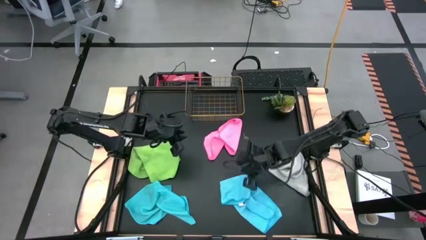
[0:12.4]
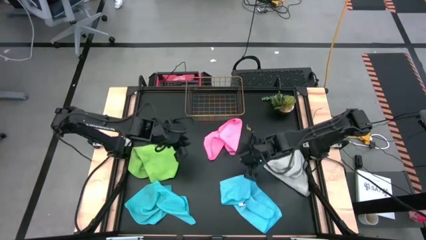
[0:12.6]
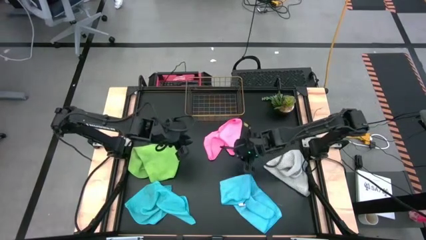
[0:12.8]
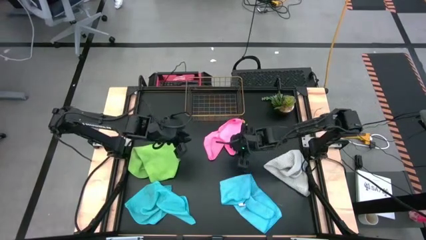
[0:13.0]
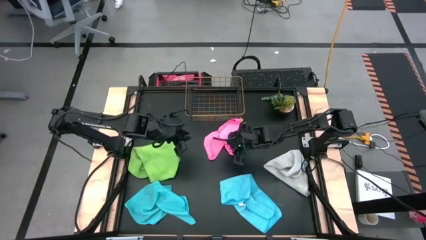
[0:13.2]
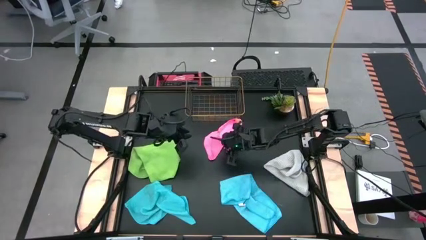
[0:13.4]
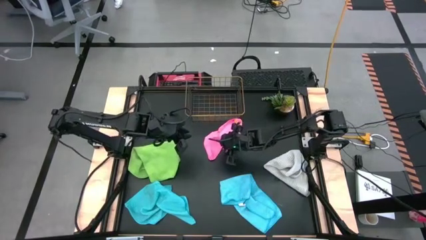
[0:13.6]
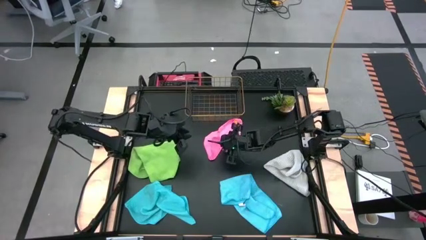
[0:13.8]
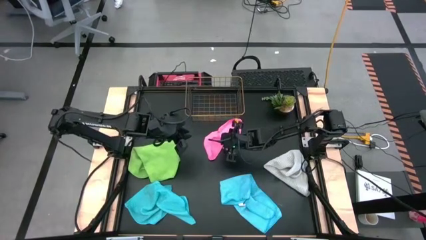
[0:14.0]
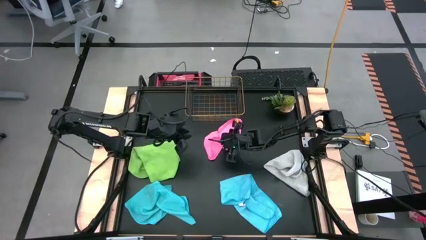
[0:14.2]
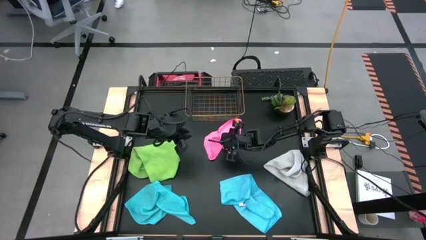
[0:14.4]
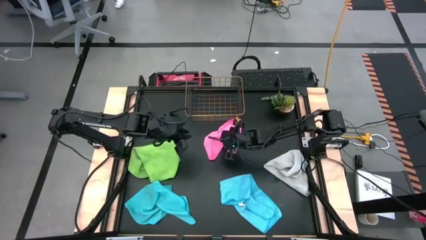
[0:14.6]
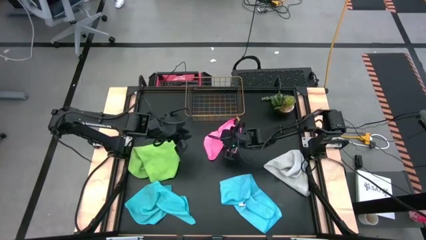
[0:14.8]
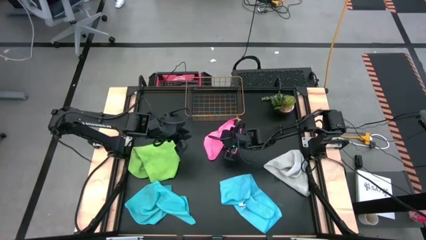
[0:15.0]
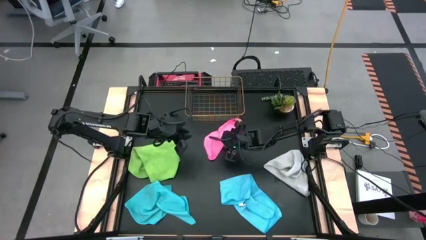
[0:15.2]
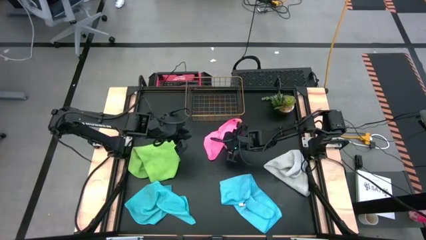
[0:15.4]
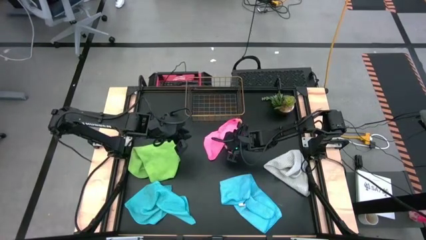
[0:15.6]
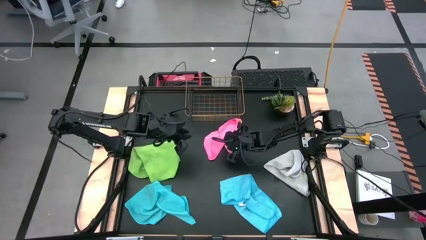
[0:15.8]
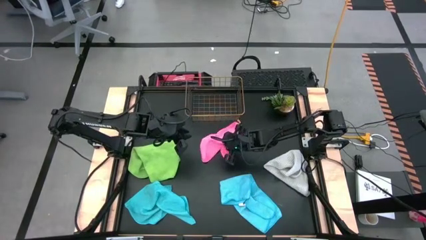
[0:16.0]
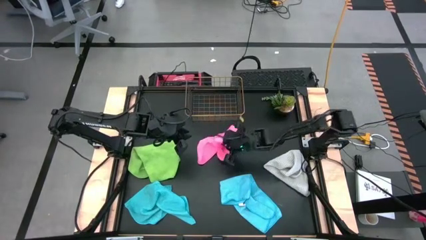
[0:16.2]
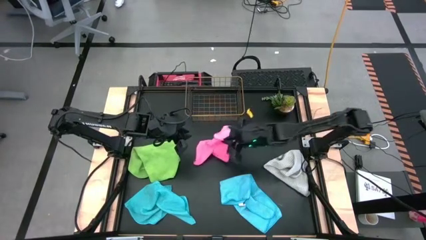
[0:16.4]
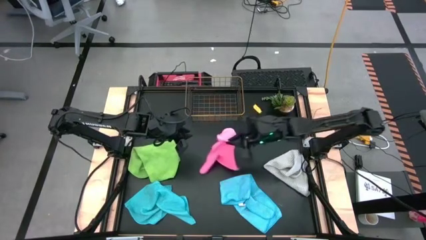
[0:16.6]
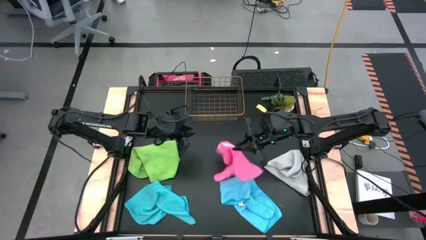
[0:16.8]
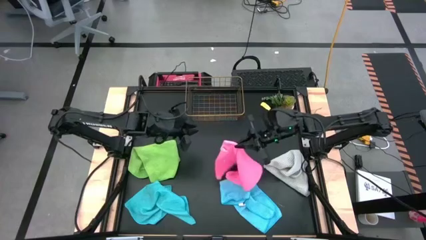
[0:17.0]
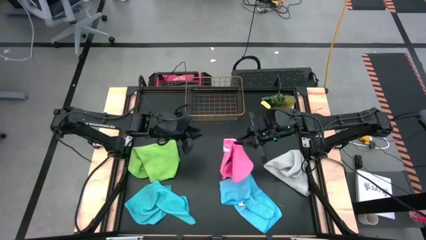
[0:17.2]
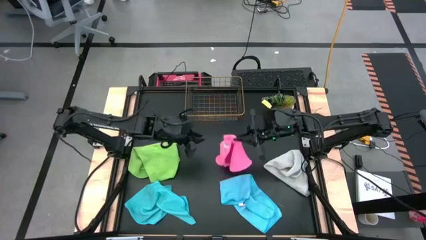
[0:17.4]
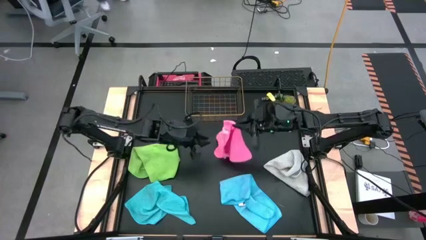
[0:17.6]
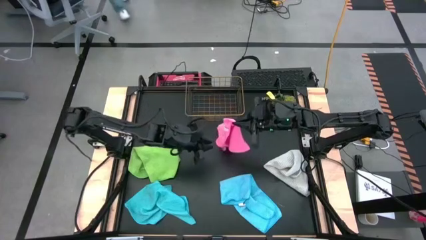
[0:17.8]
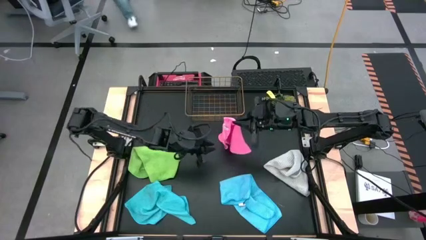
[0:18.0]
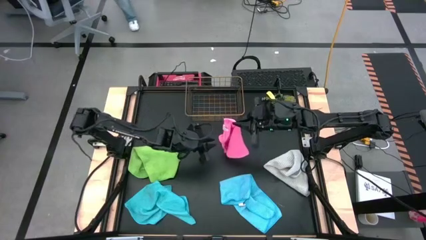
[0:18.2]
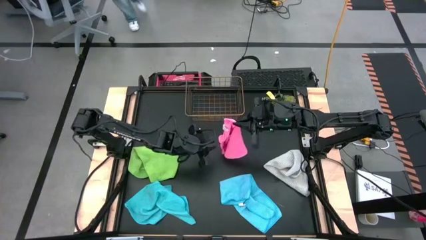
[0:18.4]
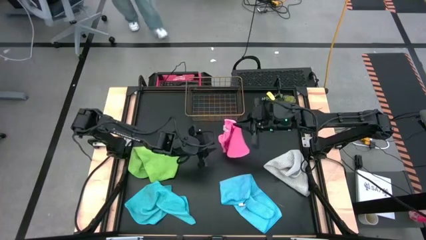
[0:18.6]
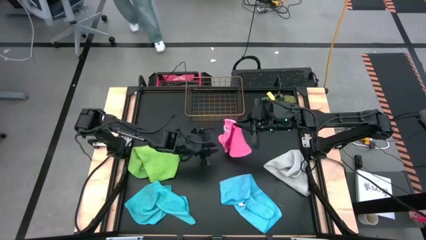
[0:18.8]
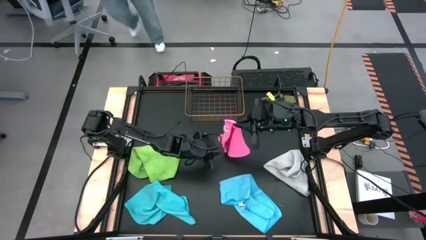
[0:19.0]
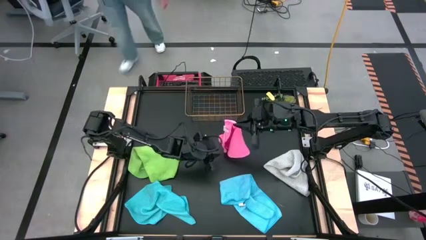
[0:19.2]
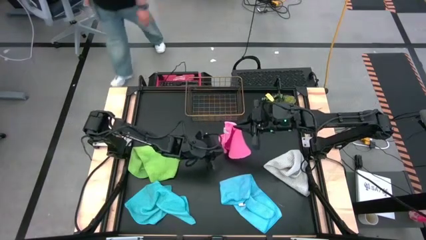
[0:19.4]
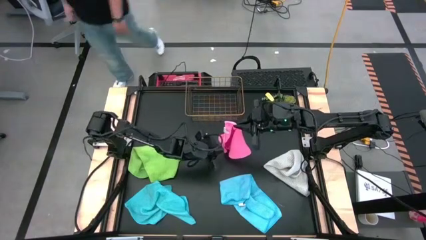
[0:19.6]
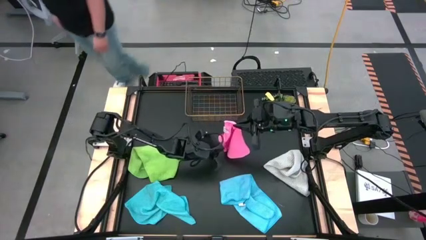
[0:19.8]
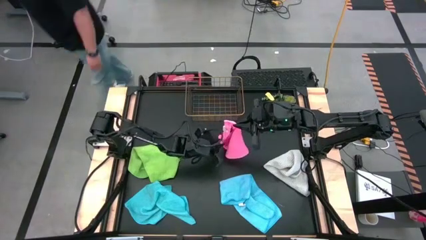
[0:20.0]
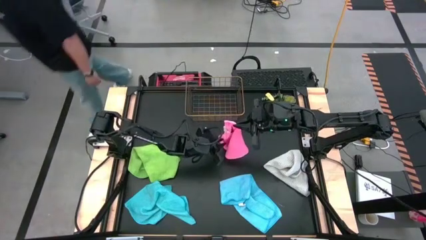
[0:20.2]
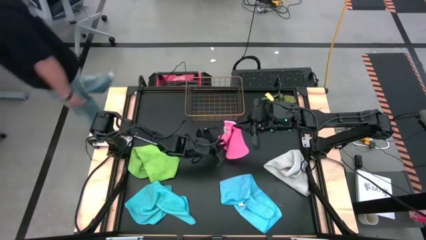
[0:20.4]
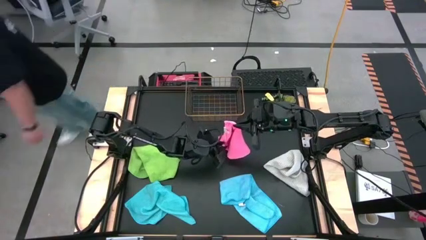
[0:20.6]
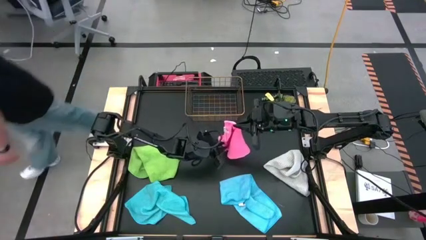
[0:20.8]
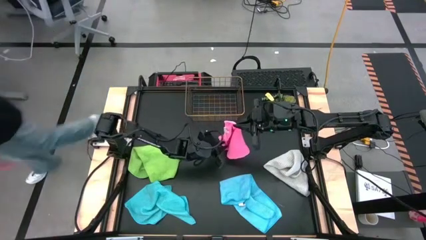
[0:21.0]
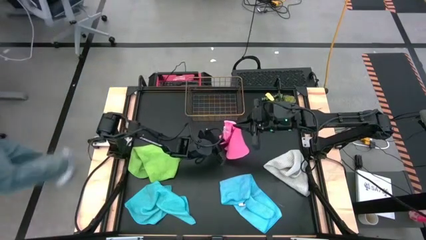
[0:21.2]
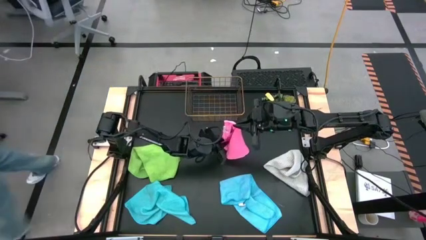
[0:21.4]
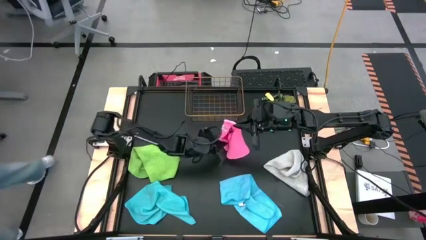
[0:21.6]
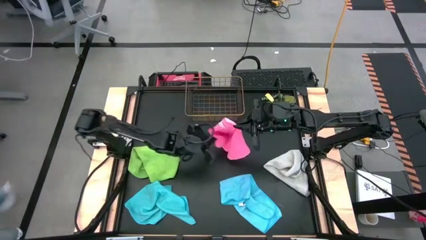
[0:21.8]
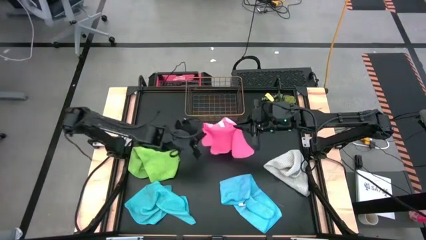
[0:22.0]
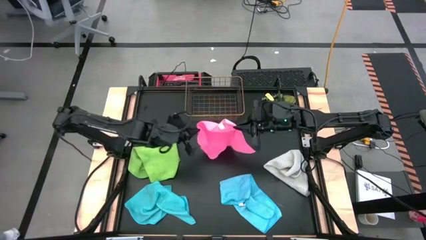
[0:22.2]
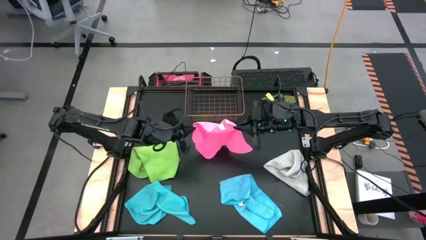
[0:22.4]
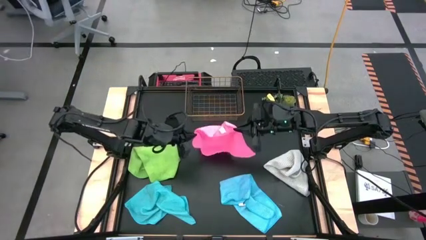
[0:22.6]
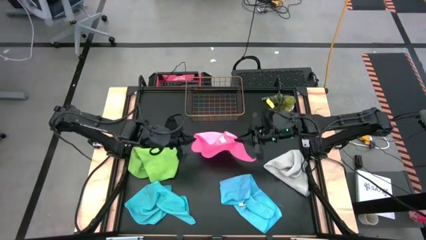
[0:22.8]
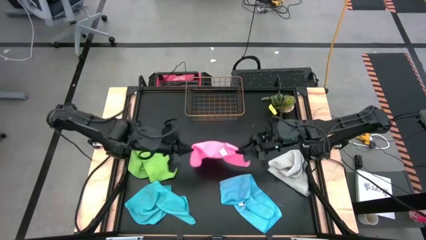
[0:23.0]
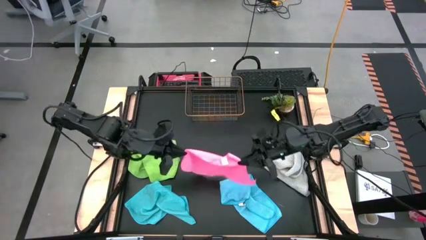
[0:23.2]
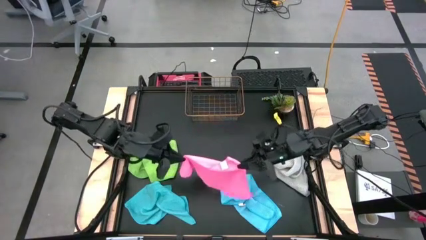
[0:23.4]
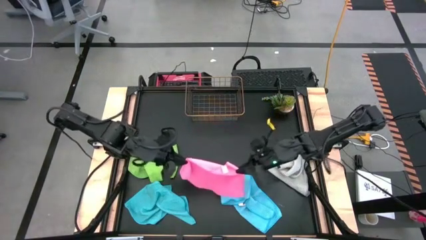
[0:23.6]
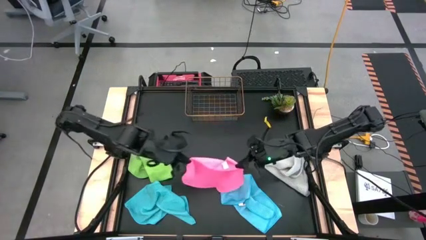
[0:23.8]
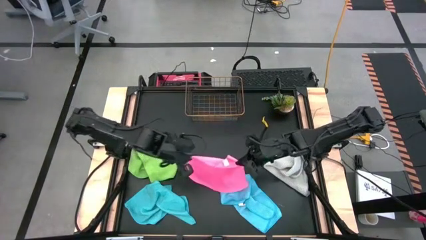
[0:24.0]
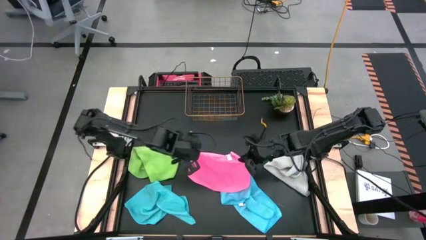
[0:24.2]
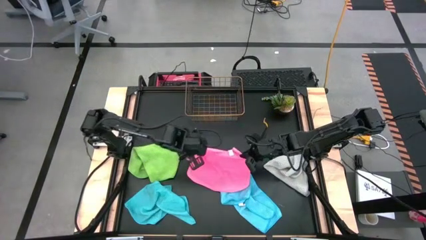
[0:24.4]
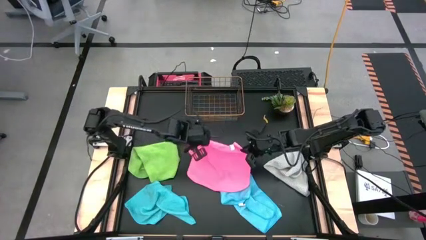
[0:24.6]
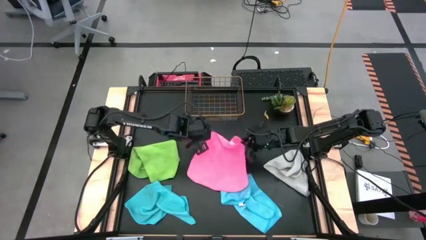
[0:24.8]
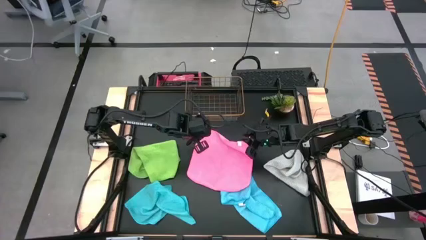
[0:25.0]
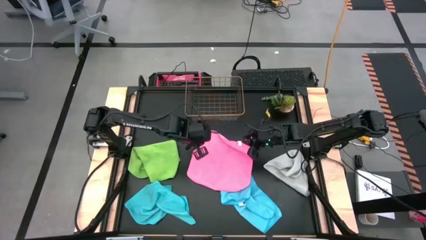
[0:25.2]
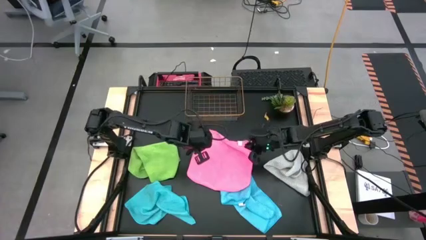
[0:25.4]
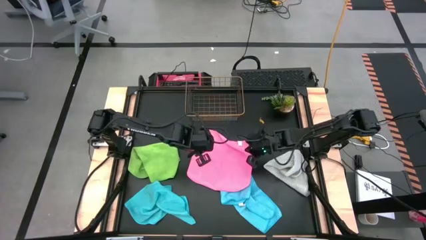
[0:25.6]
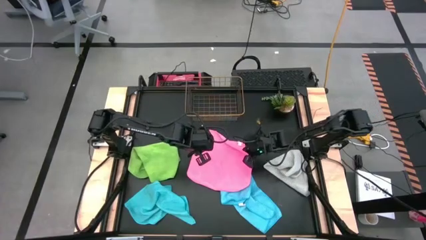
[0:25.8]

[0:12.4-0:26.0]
Task: Fold microfiber towels
Fold the pink microfiber cloth
